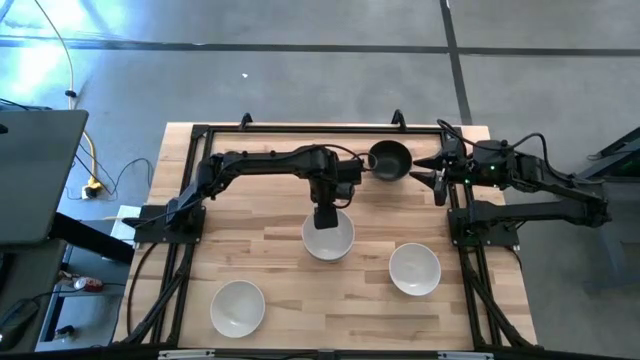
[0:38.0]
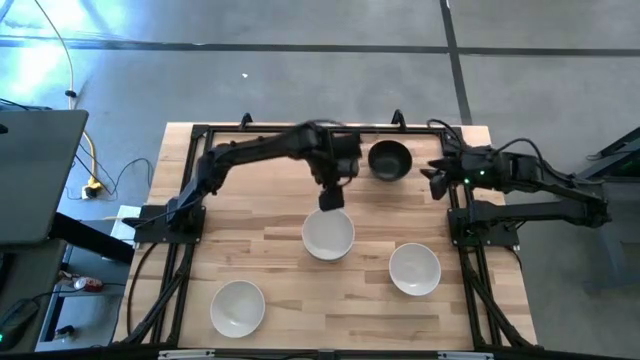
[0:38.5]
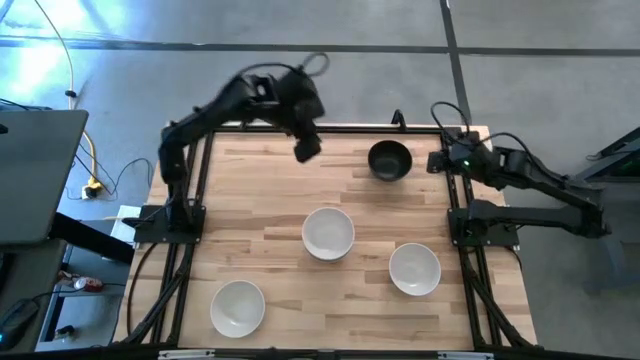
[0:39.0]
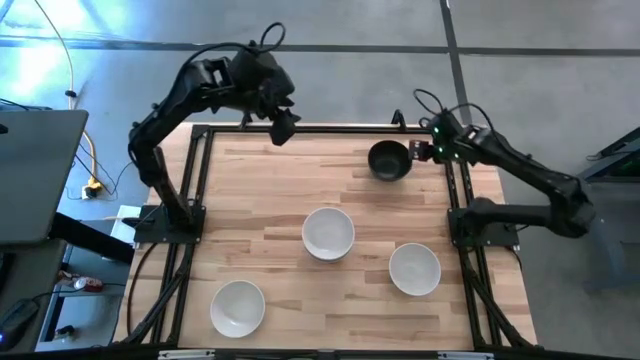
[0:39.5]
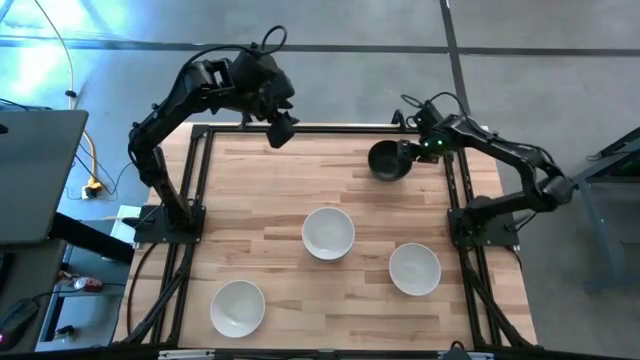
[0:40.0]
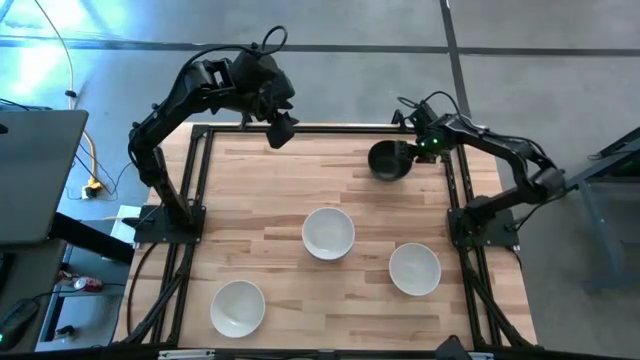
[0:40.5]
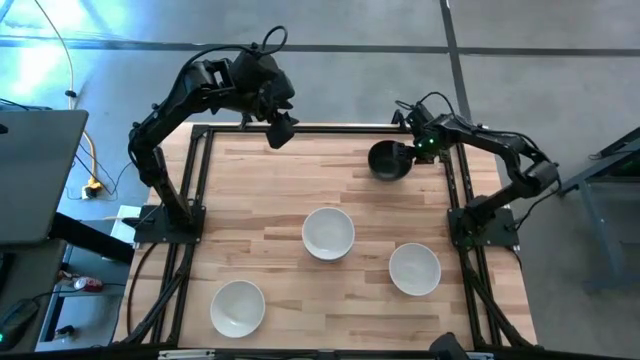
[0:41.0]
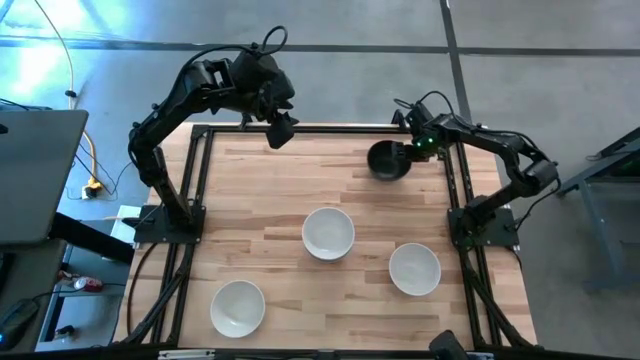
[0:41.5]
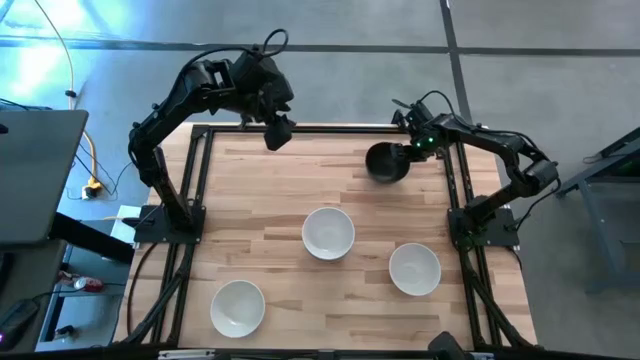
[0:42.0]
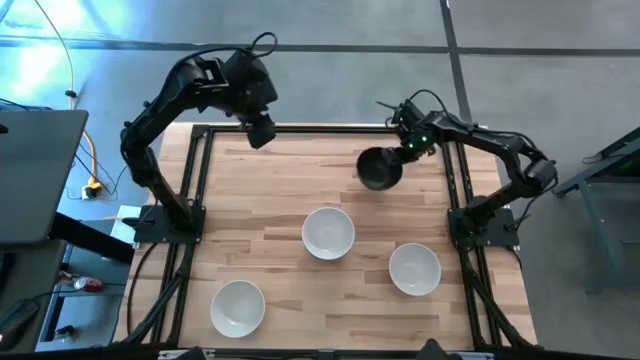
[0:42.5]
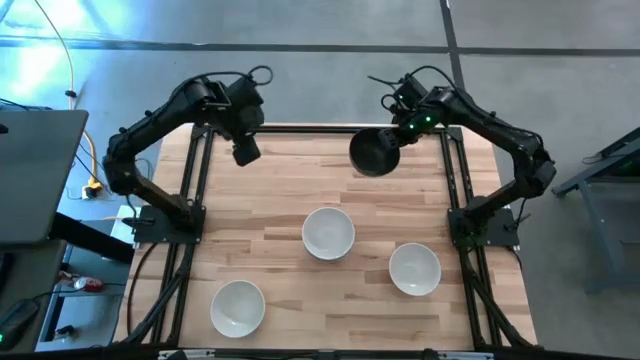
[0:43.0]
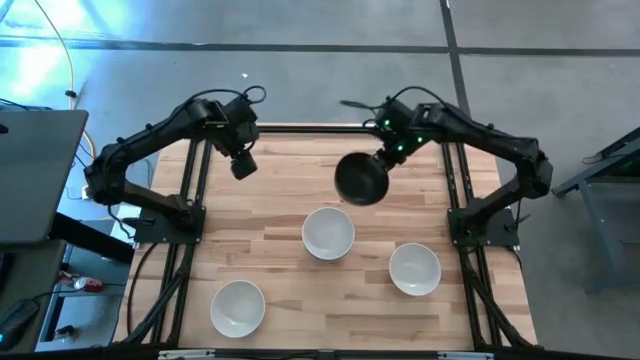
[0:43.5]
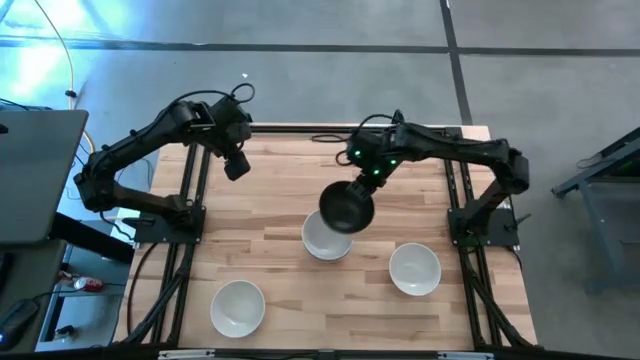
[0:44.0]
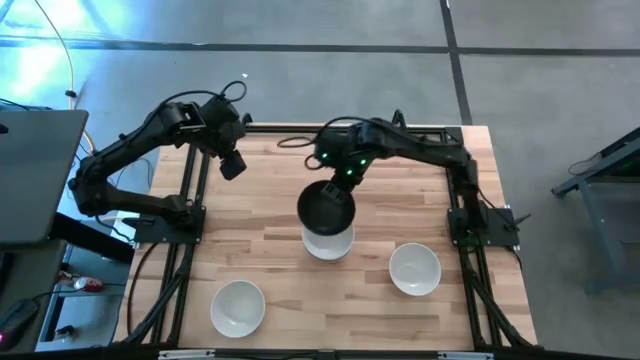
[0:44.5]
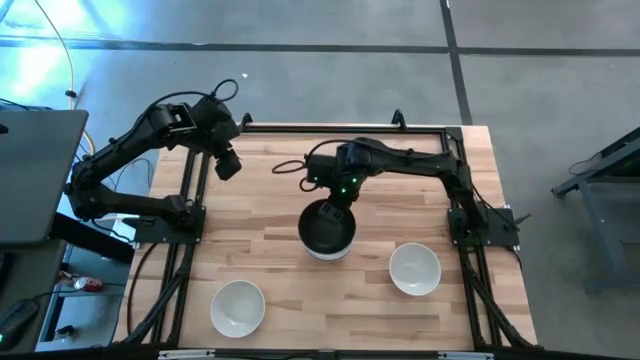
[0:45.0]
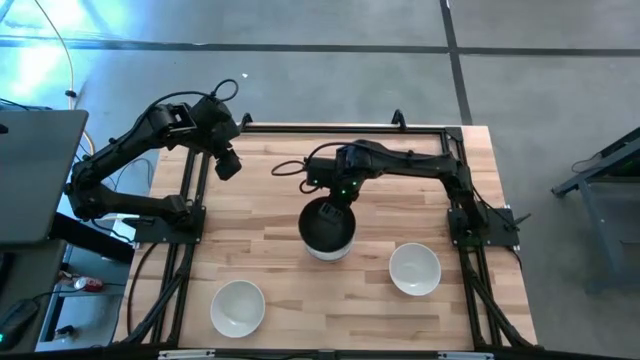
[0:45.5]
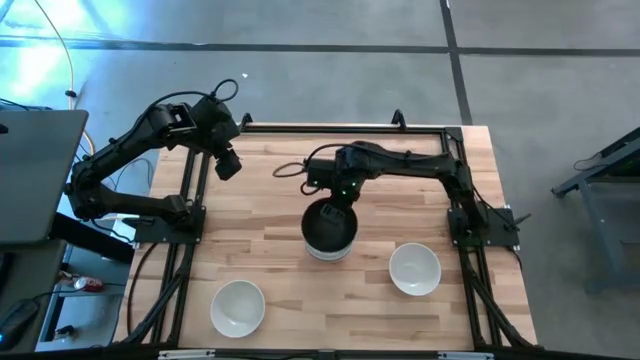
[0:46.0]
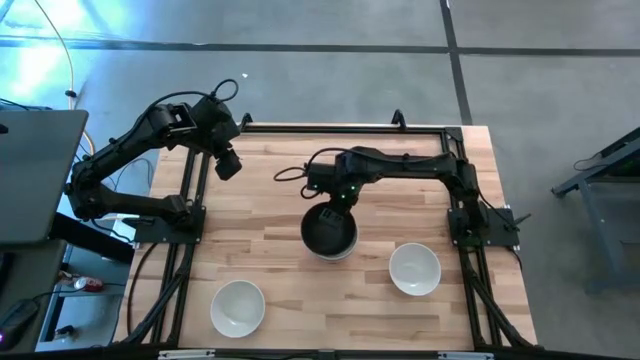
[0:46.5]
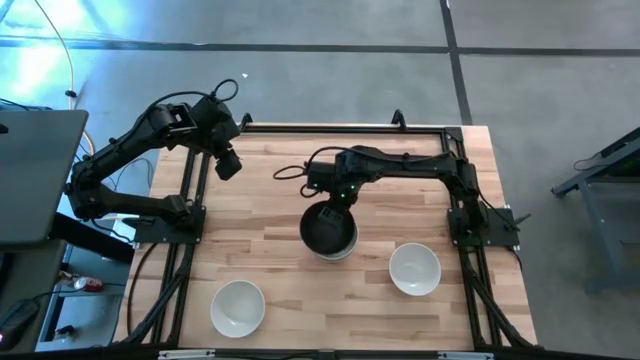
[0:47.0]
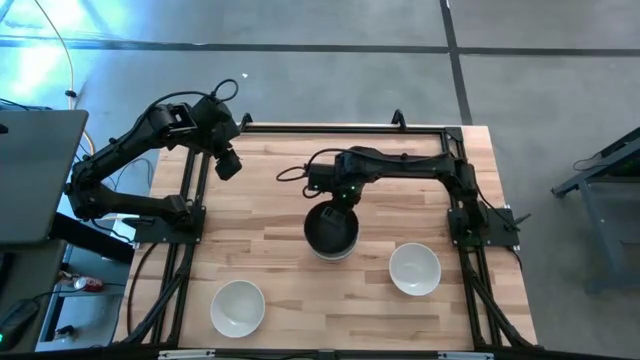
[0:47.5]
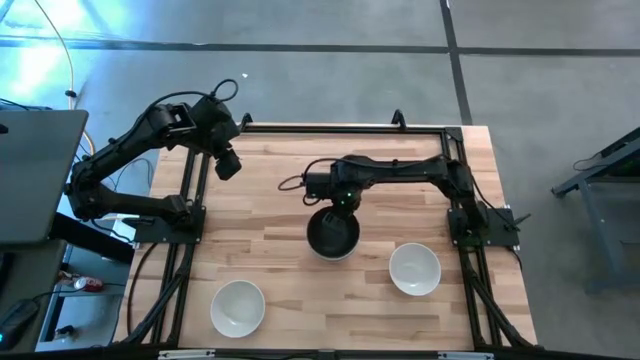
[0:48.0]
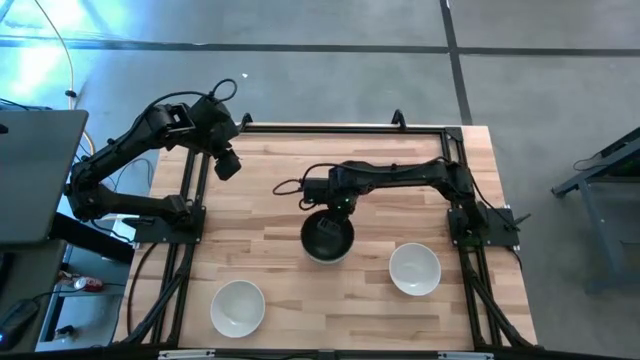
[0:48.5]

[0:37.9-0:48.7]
Task: Nest bowls inside each other
Stack the black bowl on top of the top left white bowl

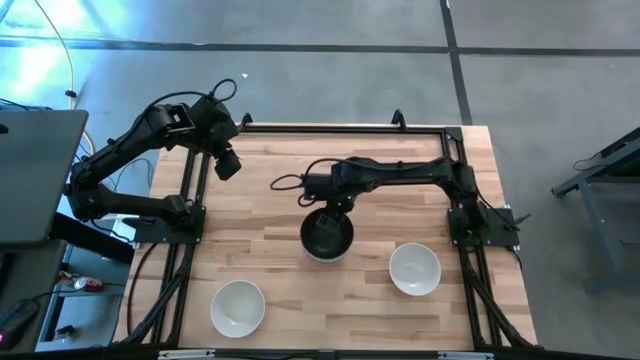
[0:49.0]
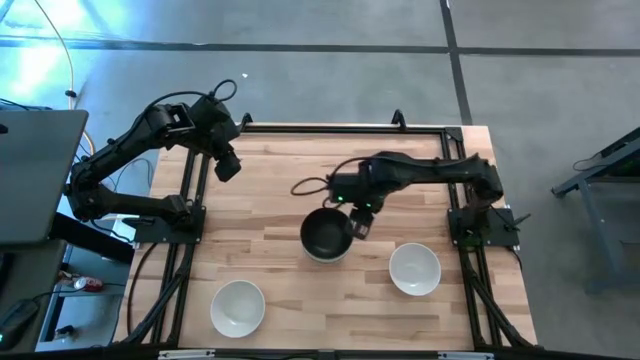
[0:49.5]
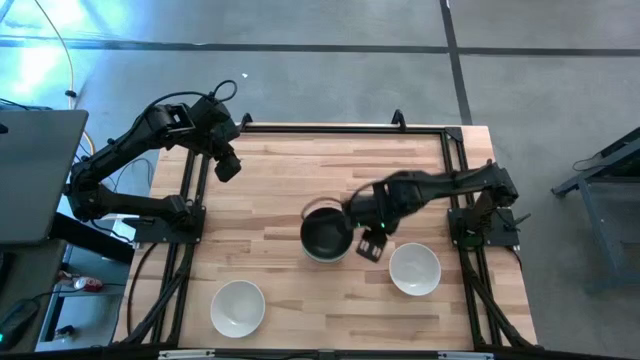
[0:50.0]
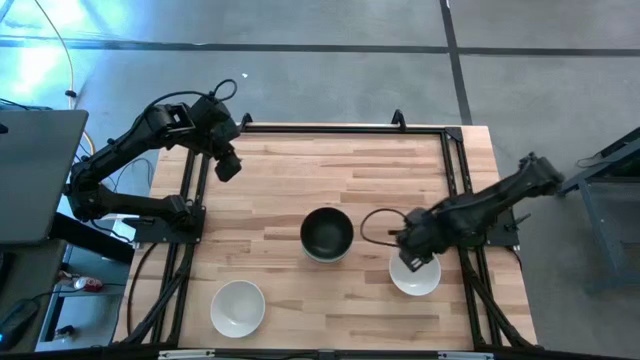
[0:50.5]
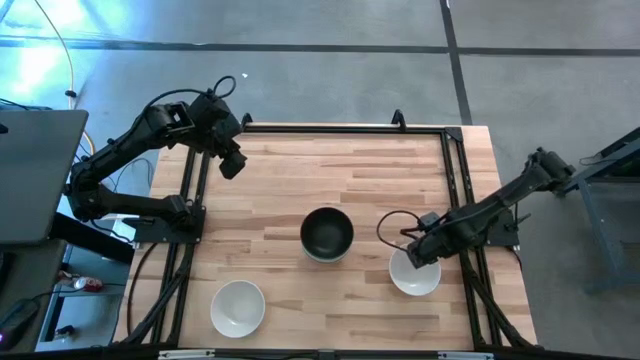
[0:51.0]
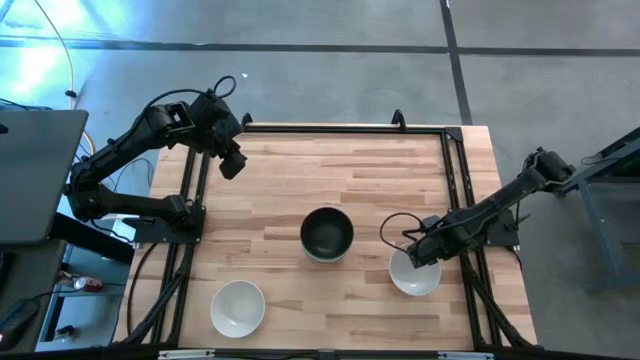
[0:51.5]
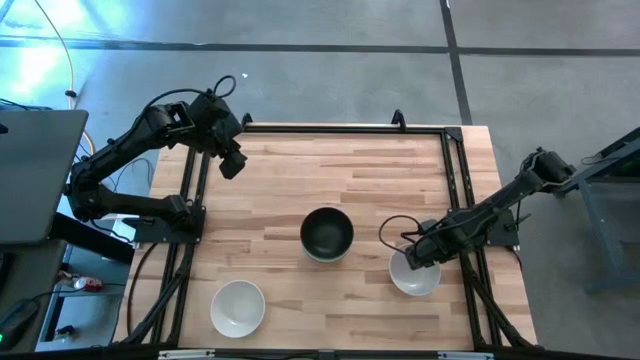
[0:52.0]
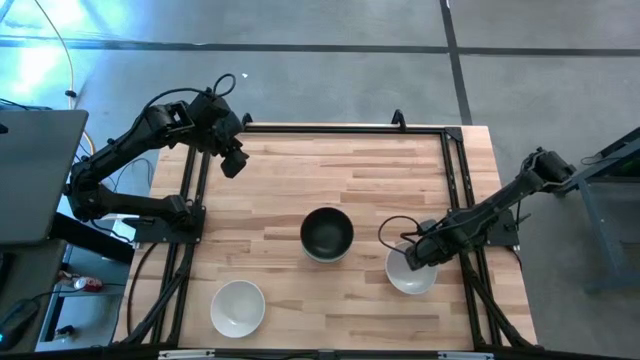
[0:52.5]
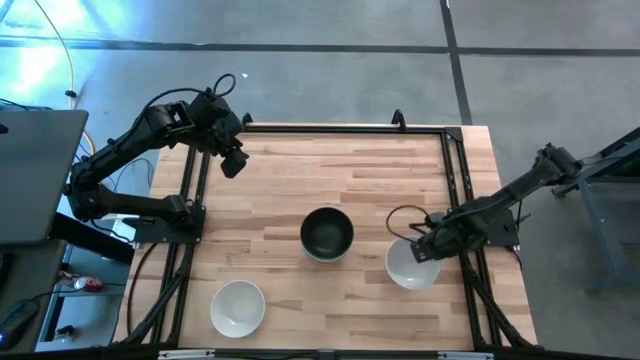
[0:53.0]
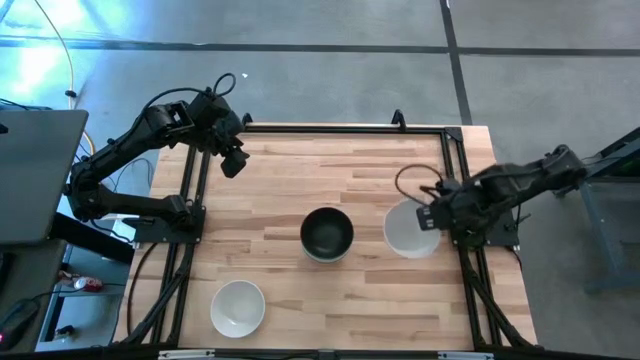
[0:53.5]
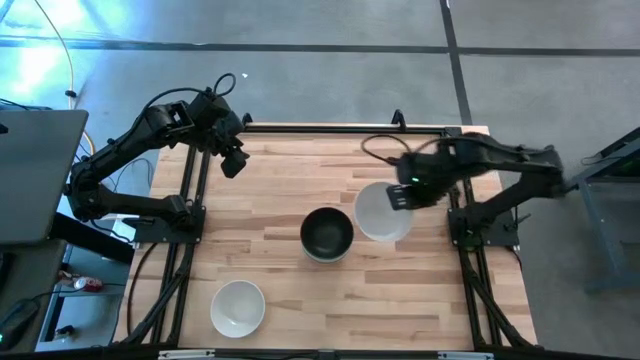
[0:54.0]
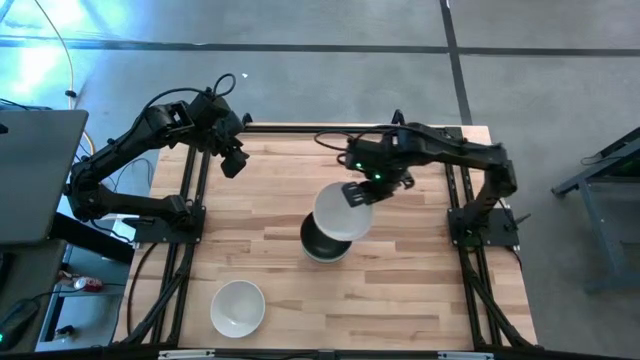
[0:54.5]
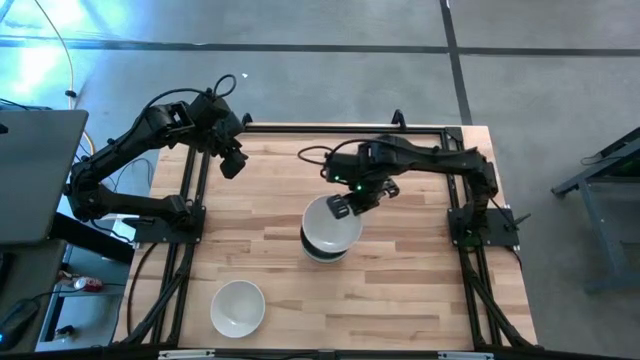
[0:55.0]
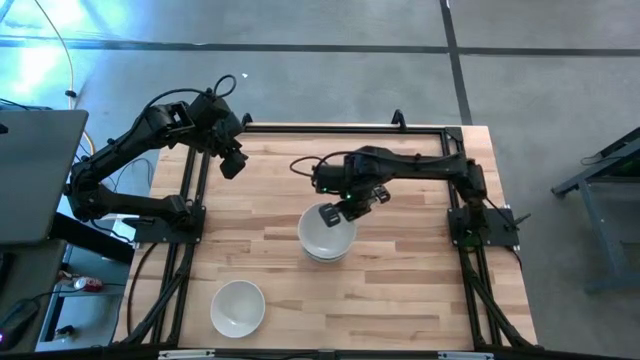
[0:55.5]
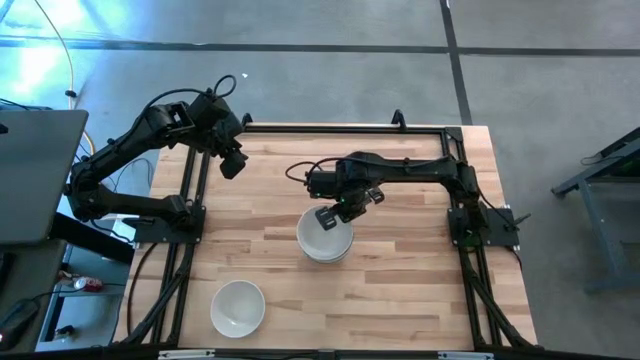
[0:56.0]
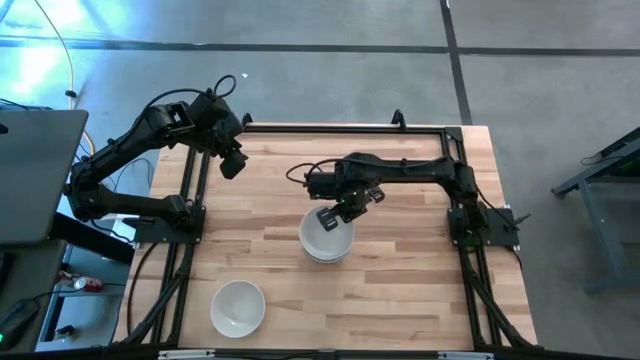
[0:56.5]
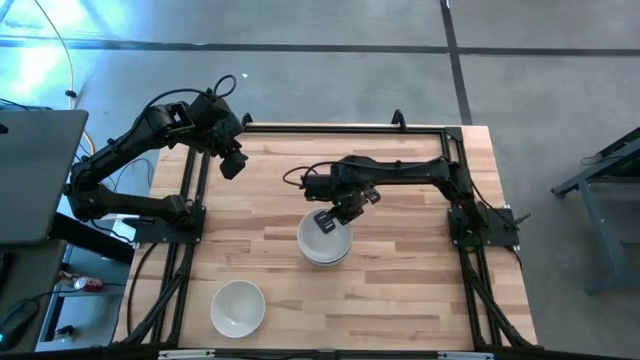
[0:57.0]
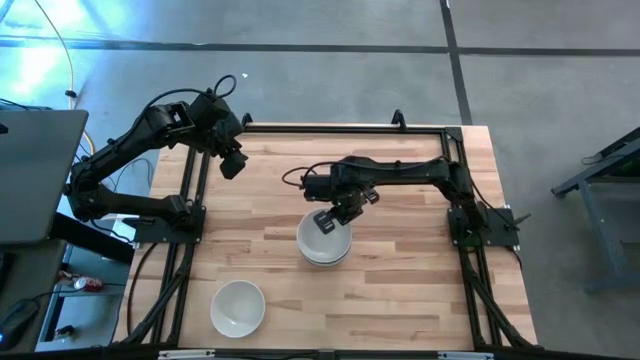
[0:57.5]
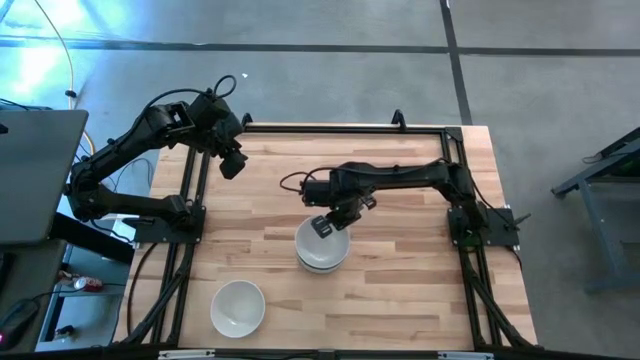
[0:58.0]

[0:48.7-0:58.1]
Stack the right white bowl on top of the black bowl
